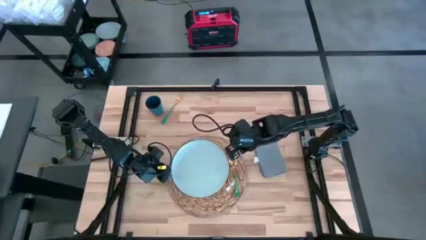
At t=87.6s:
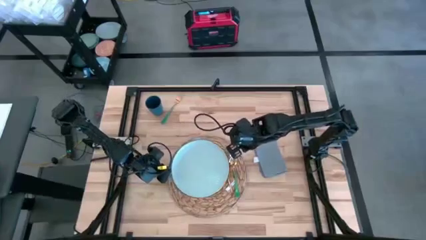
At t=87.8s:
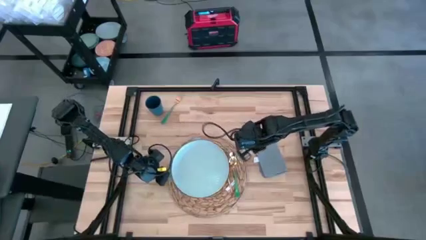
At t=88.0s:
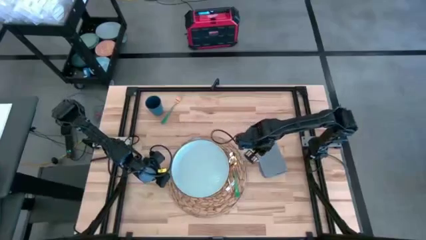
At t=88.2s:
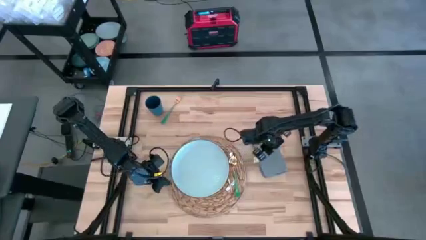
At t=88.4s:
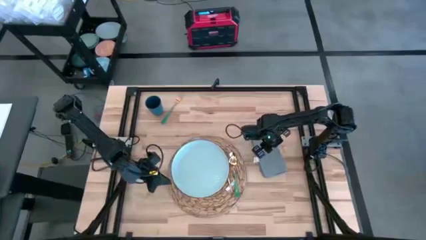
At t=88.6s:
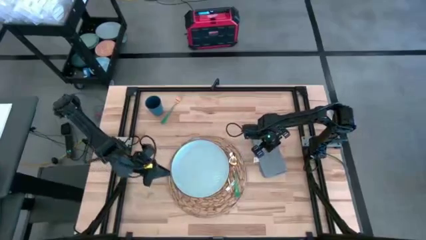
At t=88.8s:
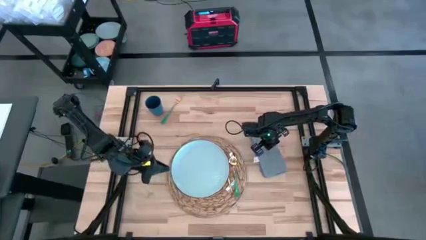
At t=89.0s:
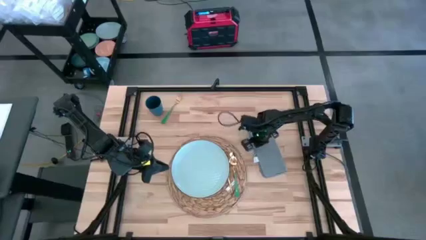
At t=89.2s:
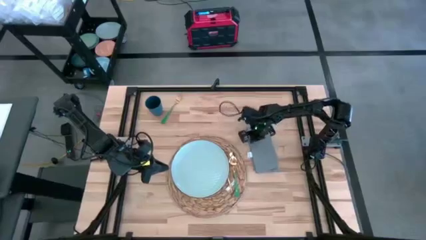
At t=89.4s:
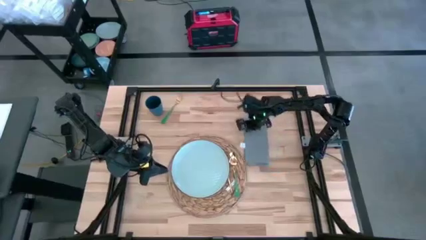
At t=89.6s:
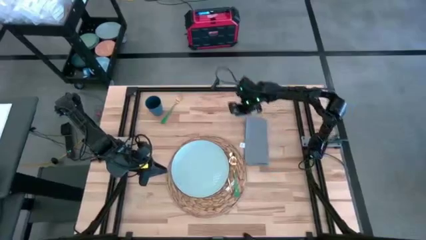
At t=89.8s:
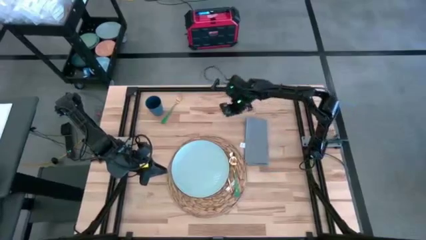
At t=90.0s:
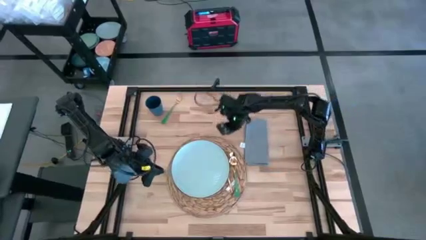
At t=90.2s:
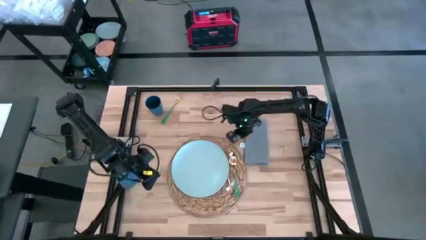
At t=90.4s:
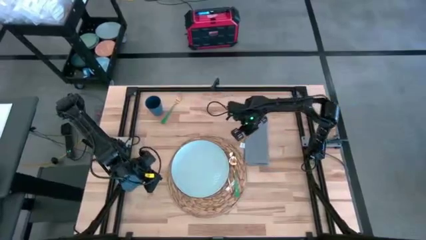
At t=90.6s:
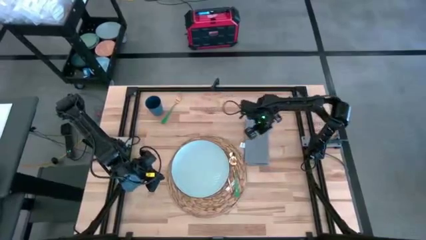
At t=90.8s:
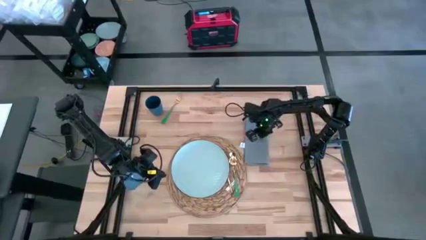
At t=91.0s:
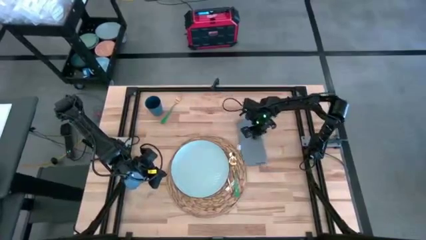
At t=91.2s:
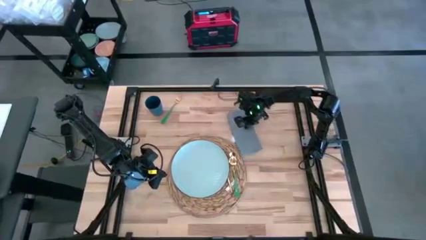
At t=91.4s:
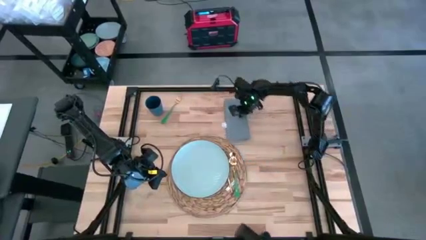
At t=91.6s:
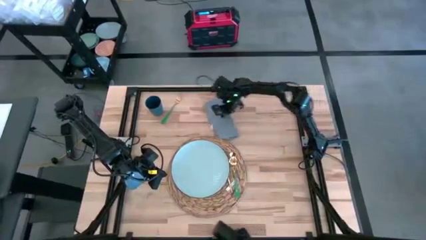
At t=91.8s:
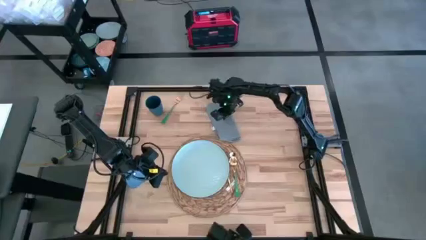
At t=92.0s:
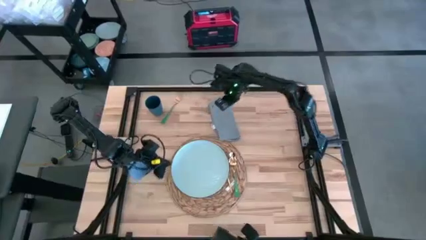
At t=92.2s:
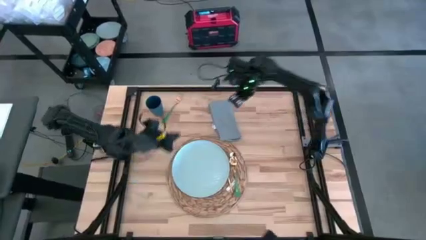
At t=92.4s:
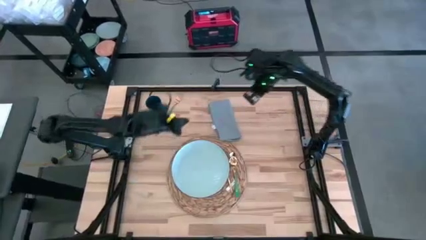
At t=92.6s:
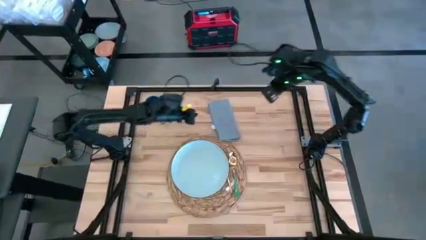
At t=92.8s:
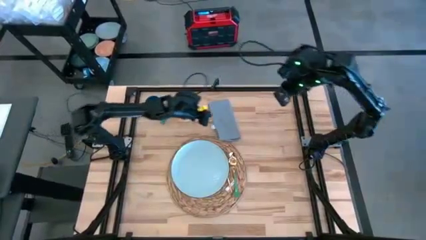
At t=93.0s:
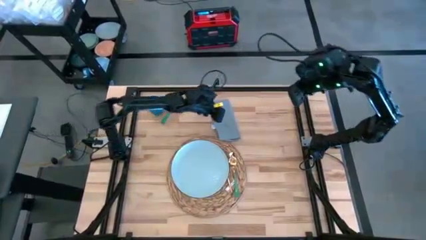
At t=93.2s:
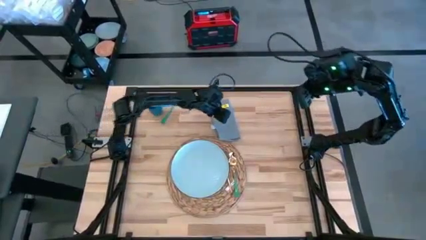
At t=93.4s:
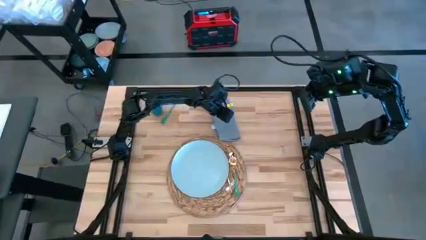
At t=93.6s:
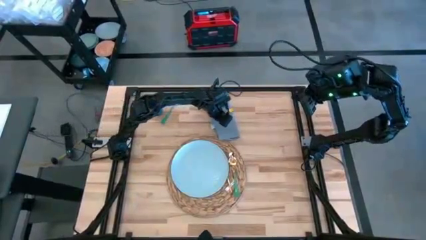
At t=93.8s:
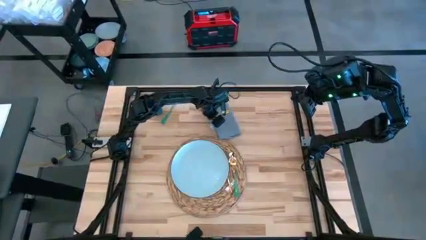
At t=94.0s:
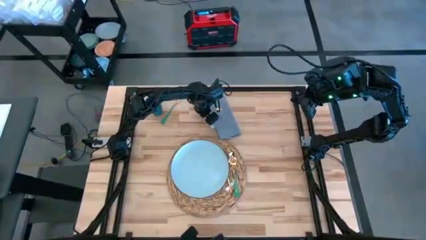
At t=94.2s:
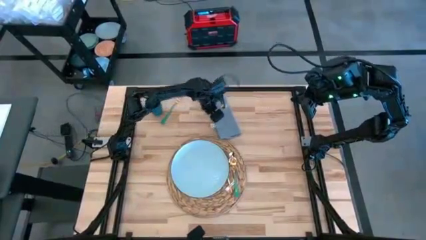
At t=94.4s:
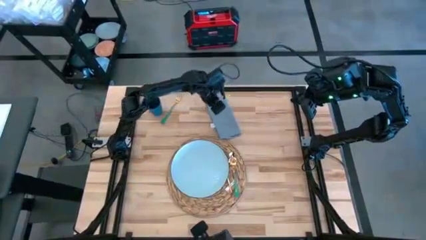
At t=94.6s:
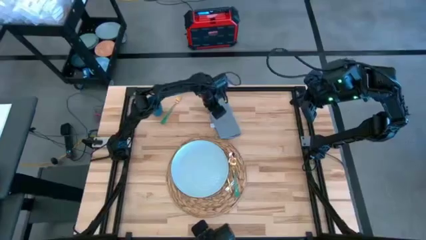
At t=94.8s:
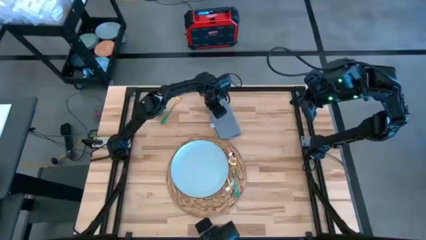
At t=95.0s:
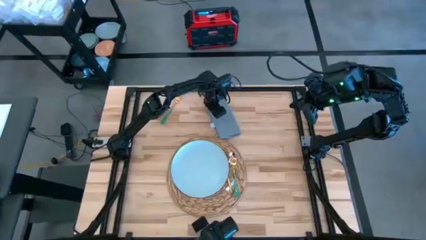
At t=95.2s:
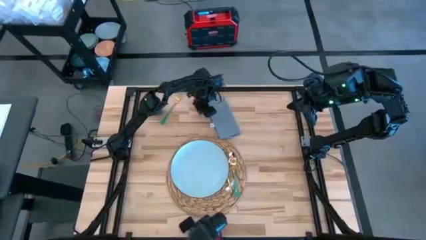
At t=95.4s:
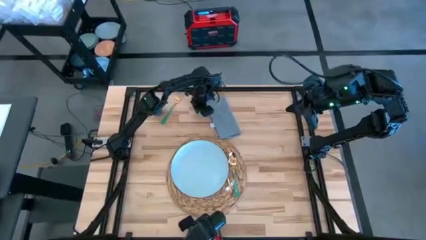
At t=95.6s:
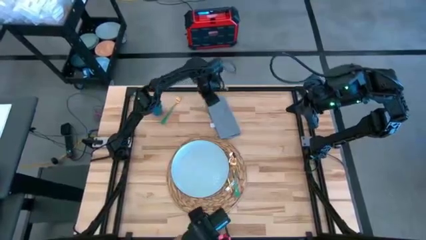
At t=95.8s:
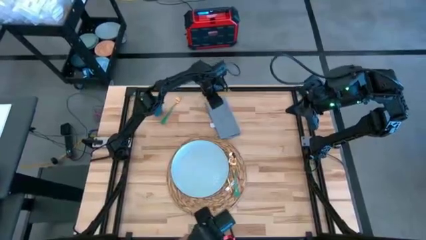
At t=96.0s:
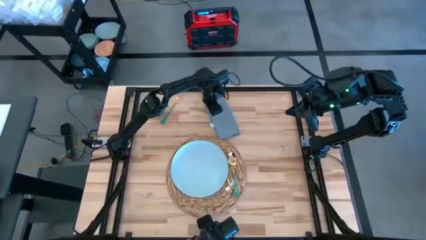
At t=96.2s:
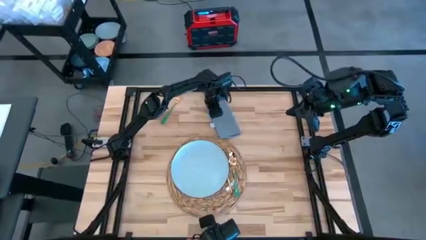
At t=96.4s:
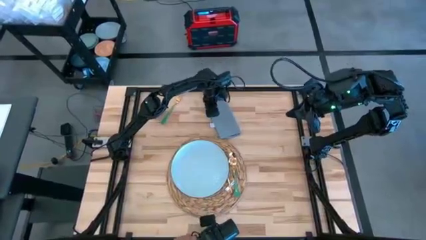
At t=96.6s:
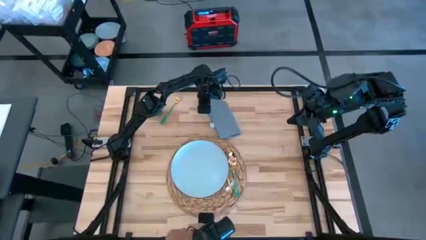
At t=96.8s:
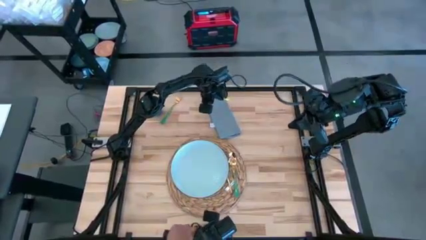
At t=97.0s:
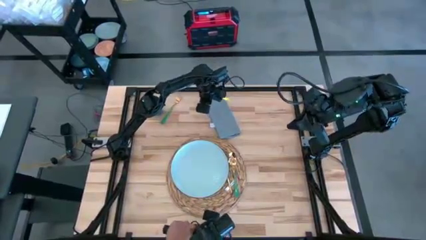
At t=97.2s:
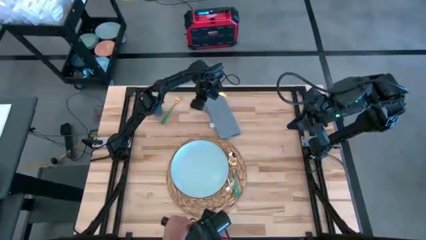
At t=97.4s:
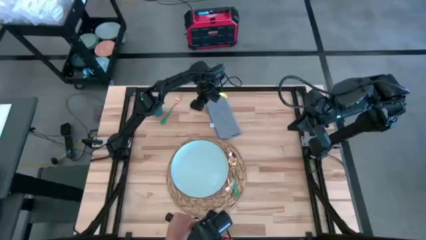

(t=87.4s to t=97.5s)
Task: Set table place
Move the gray table napkin to the left of the brown placemat
